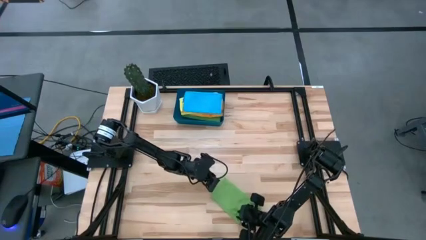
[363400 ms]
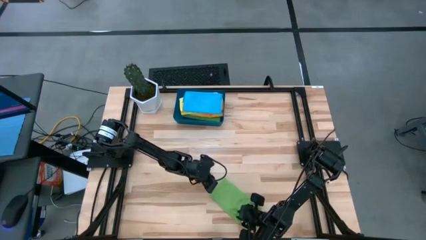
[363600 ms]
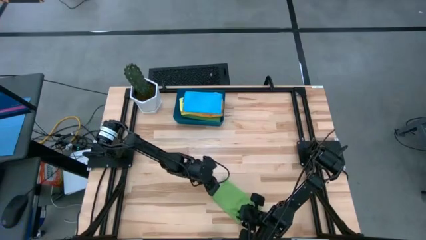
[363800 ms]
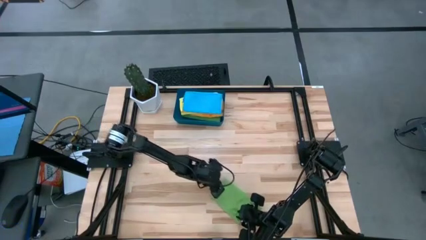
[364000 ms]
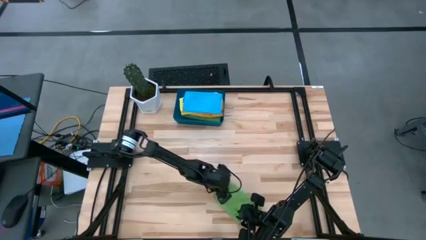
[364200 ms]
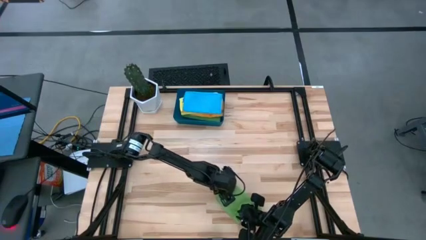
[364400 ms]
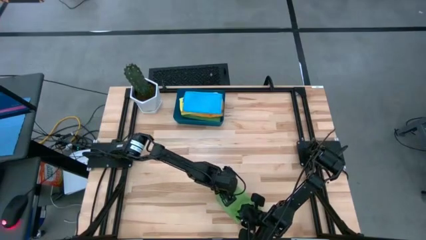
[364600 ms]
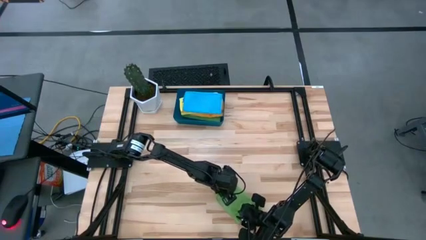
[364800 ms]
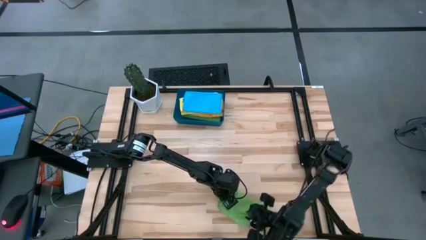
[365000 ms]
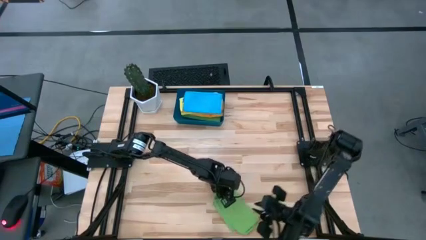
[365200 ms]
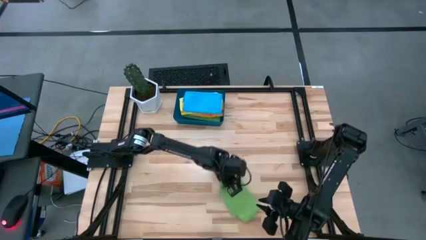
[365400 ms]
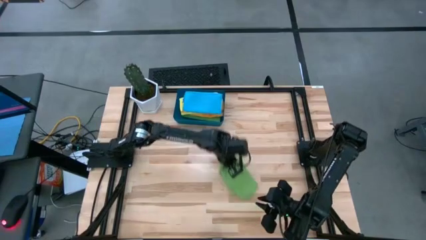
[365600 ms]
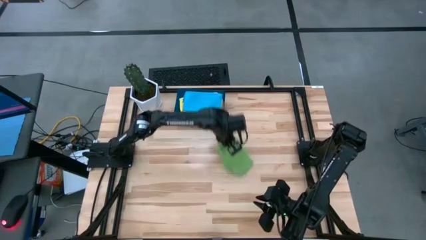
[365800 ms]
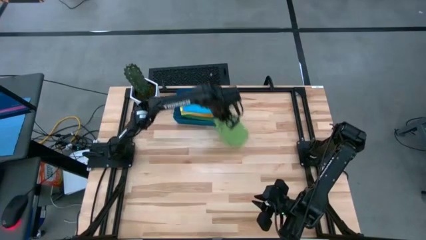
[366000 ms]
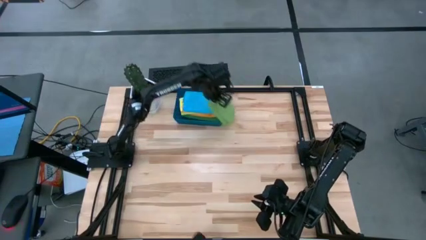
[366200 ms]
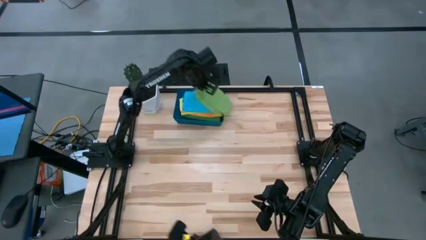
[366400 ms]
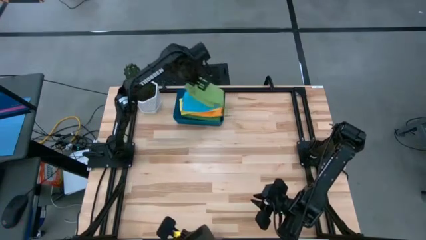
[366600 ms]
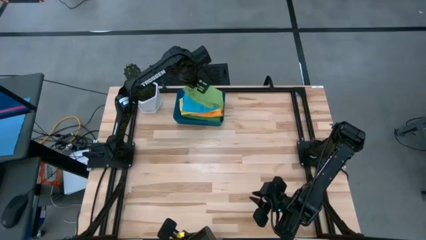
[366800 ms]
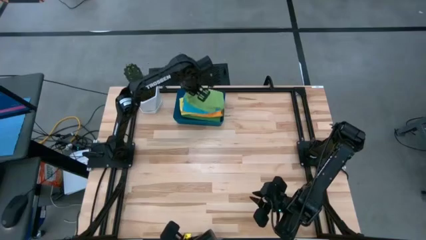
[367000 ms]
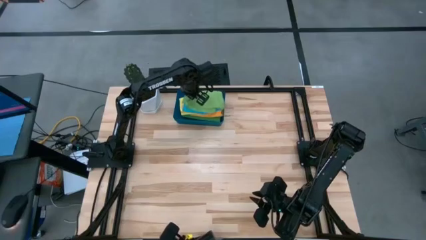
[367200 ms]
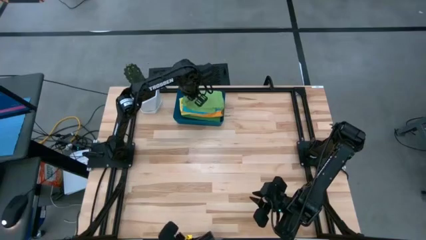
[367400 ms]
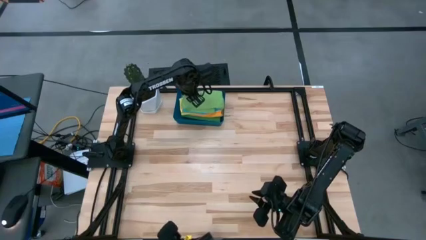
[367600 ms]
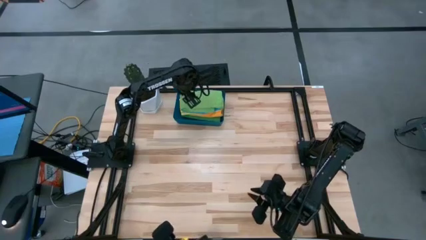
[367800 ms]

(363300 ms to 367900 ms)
Task: Fold microfiber towels
Put the green towel into the blue bin

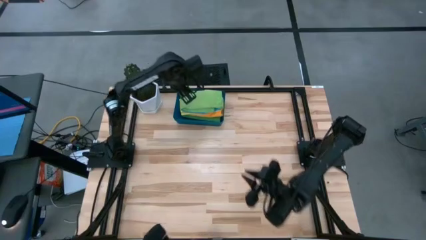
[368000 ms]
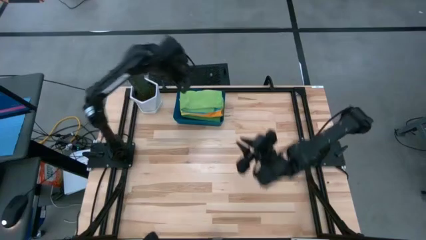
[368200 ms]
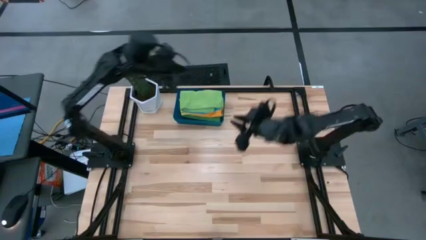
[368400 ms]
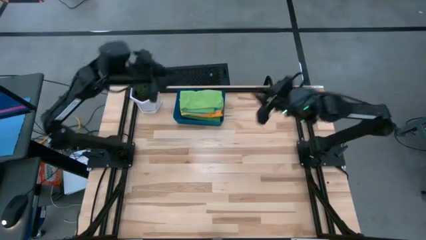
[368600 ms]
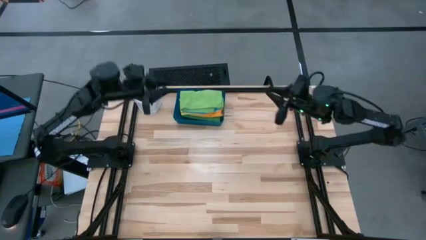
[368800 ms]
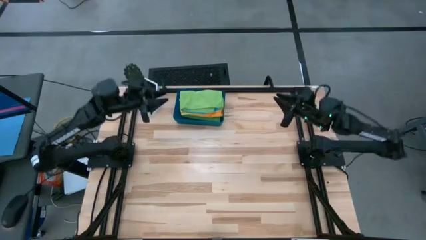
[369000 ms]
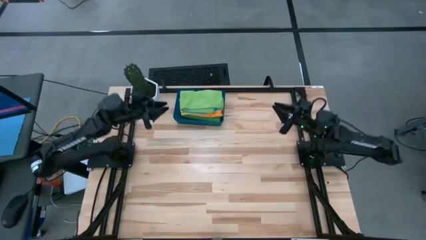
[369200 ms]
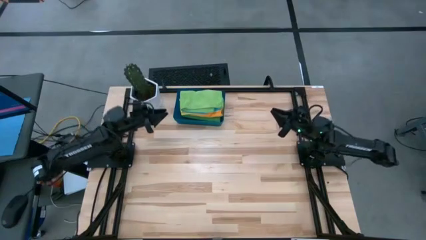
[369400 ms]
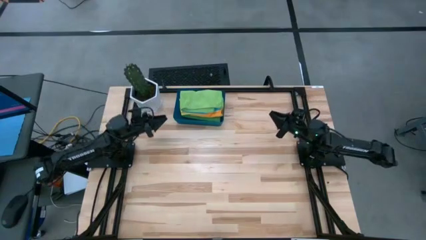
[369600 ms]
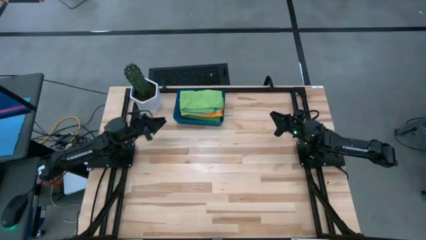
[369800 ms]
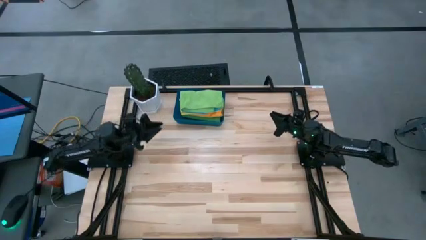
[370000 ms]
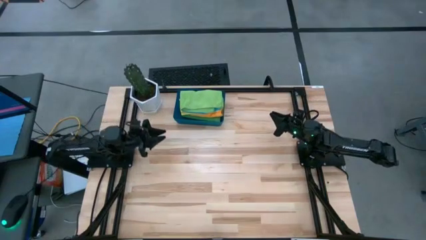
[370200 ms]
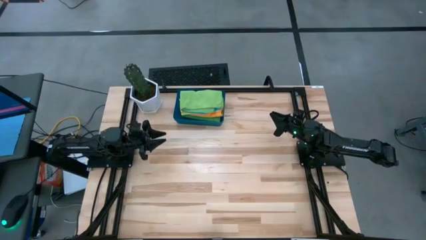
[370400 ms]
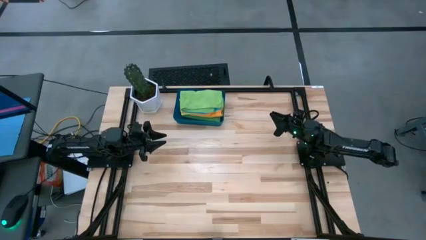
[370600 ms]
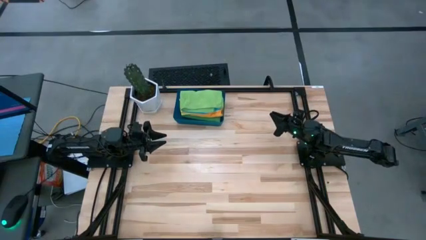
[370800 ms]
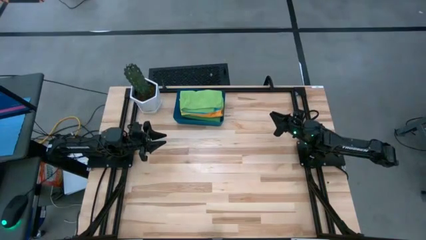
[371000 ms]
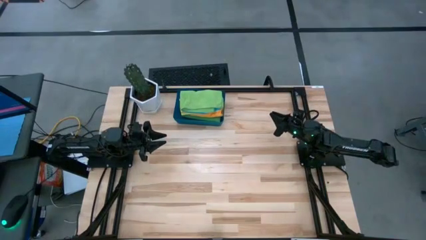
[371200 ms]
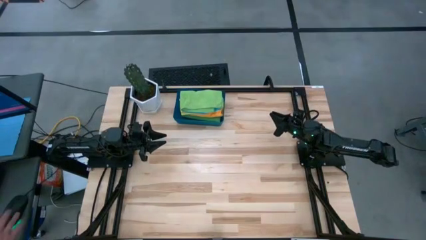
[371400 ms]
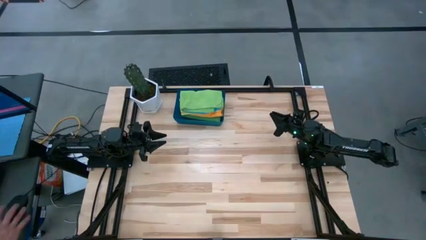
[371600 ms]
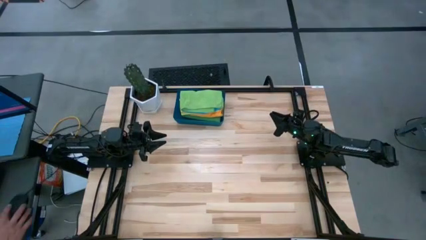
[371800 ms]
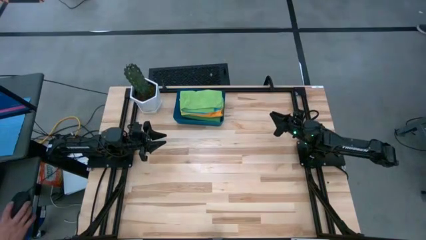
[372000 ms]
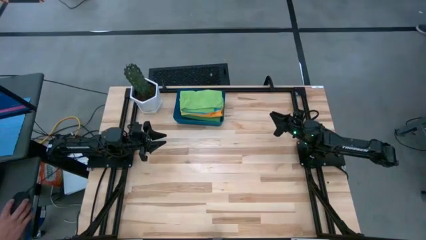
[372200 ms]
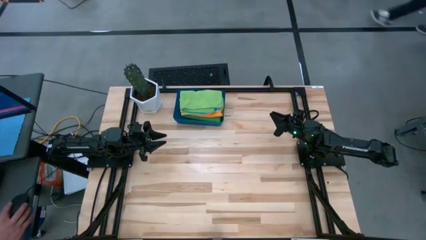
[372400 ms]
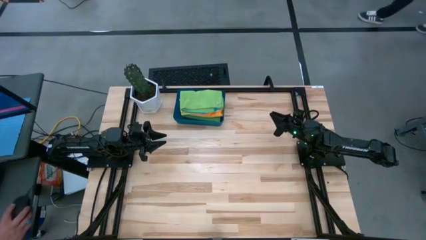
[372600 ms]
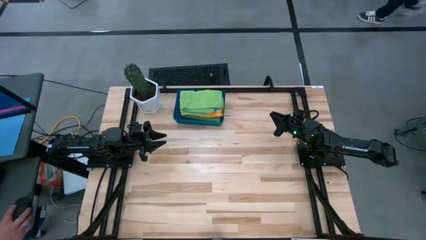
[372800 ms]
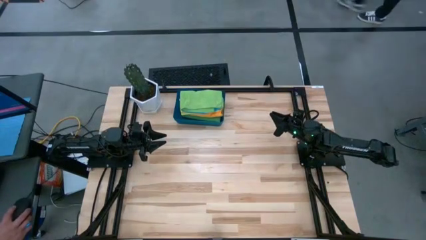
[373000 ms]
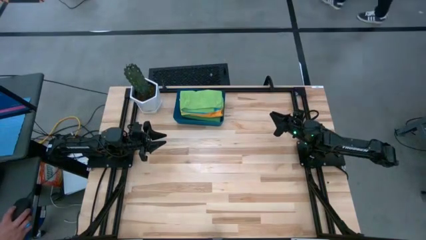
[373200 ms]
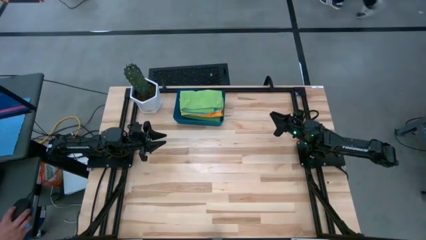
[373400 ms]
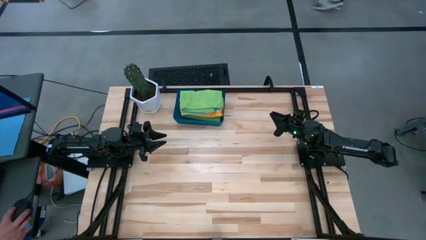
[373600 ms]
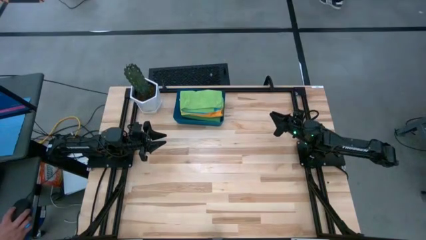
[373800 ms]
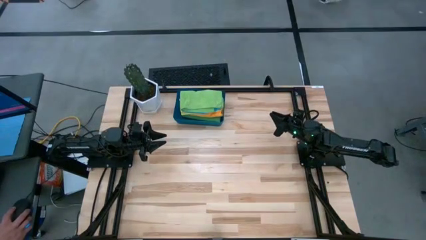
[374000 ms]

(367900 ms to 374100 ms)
Return to Home Position
